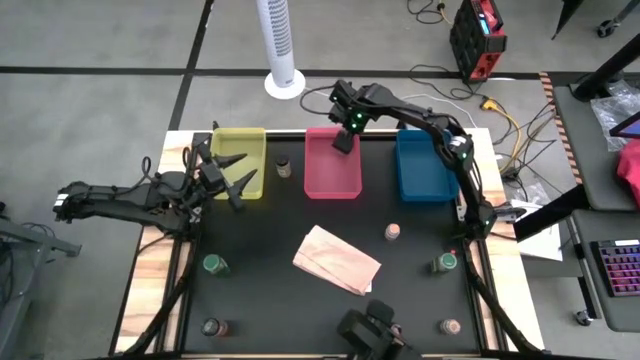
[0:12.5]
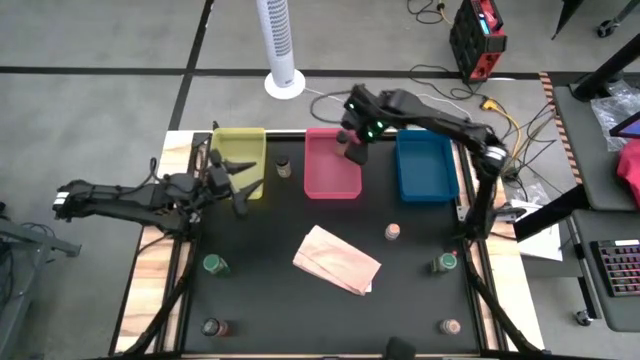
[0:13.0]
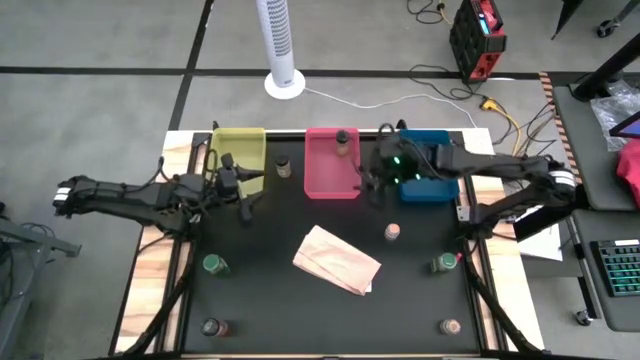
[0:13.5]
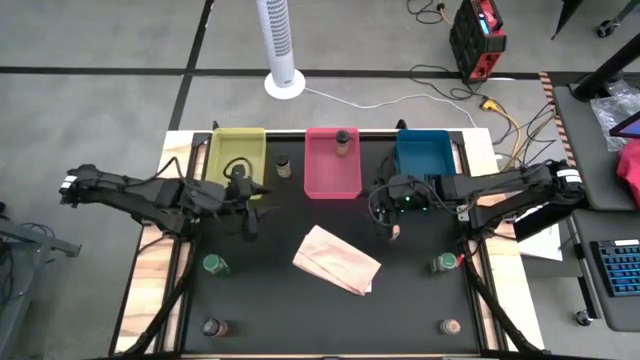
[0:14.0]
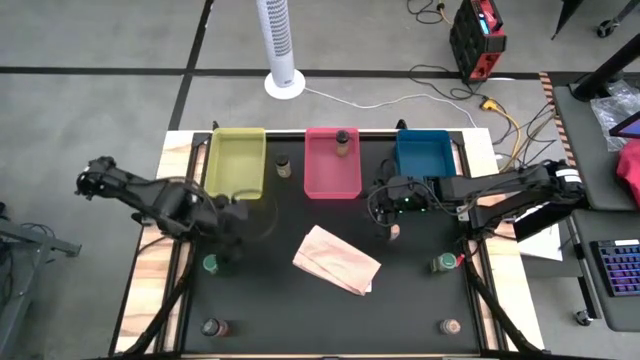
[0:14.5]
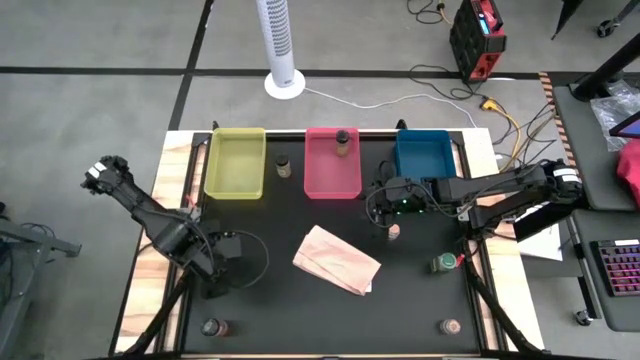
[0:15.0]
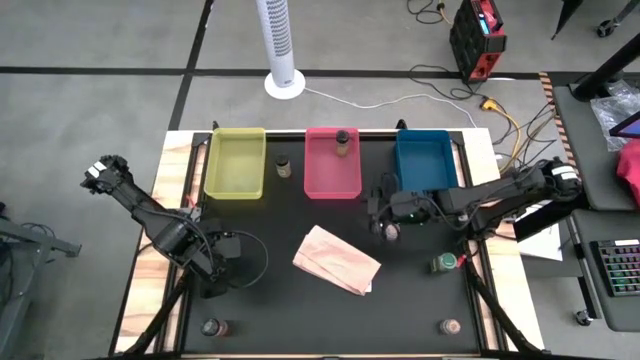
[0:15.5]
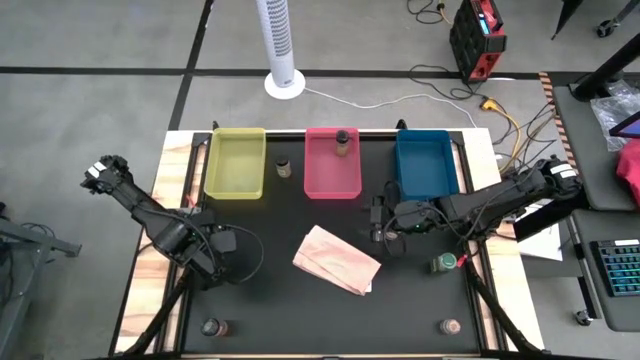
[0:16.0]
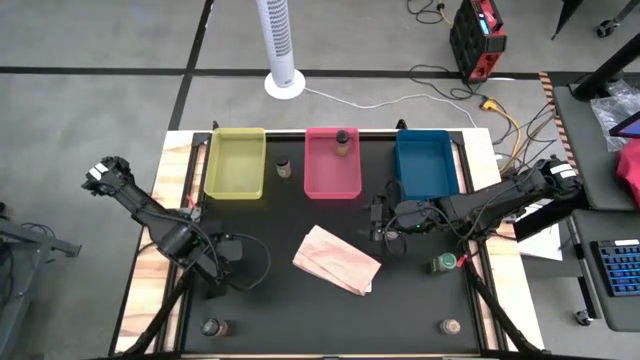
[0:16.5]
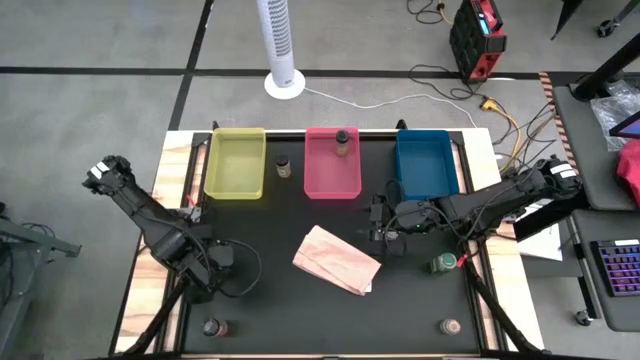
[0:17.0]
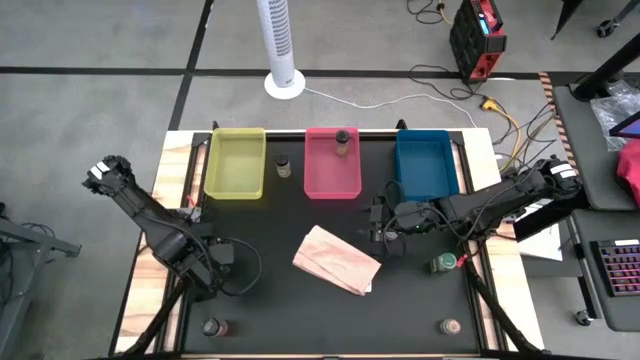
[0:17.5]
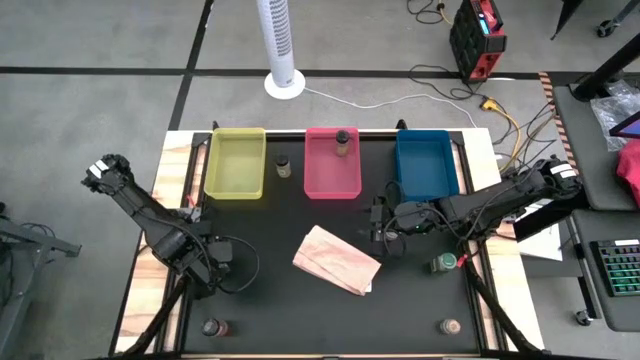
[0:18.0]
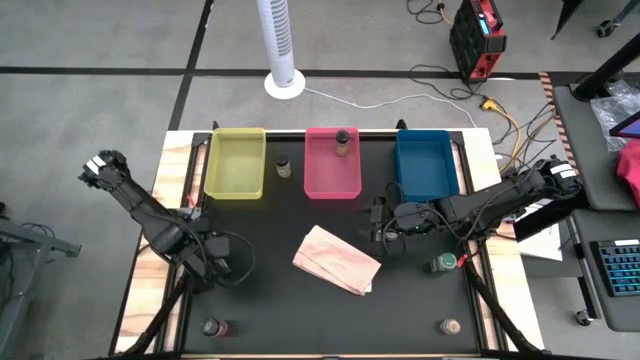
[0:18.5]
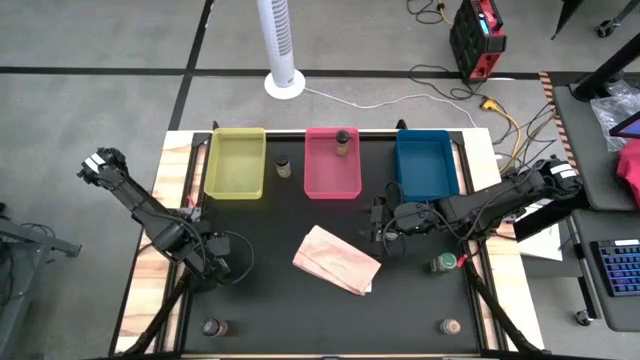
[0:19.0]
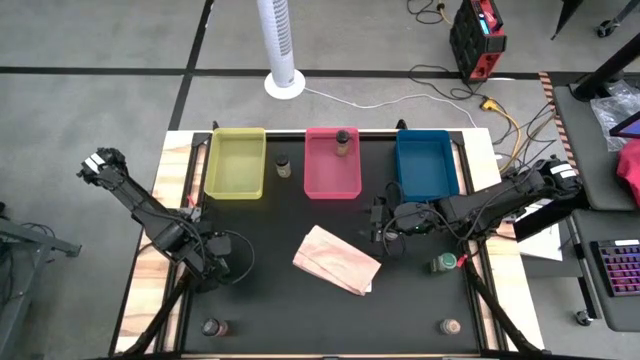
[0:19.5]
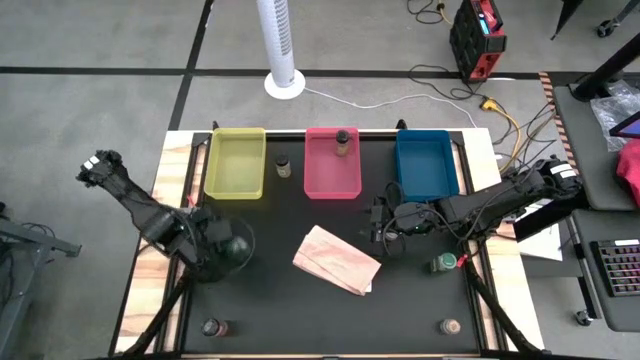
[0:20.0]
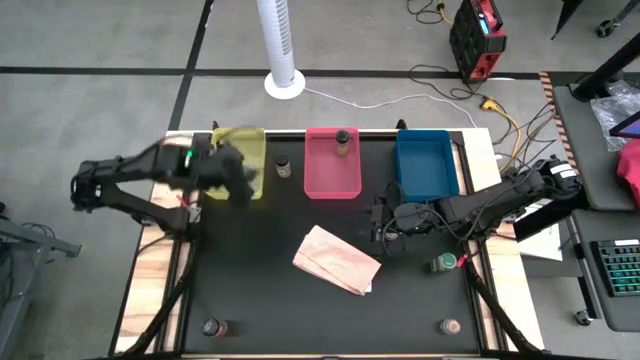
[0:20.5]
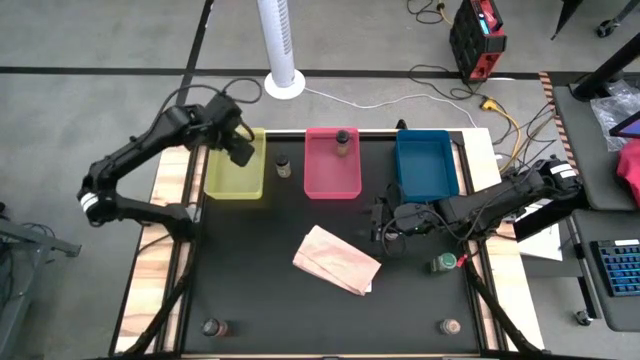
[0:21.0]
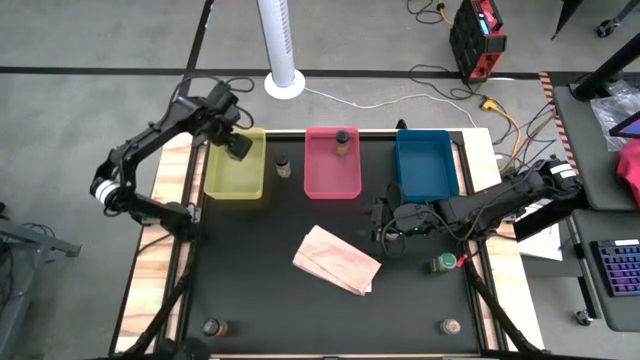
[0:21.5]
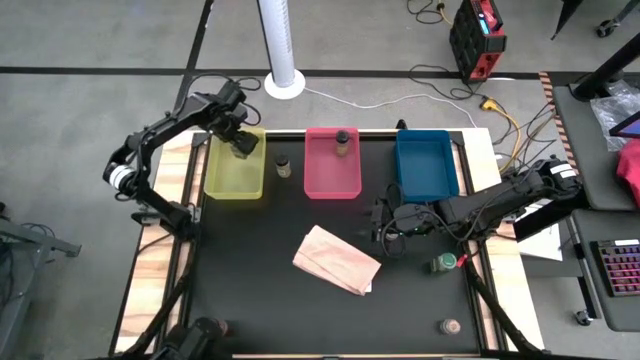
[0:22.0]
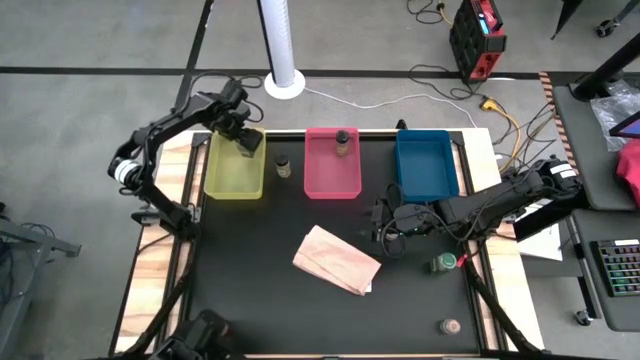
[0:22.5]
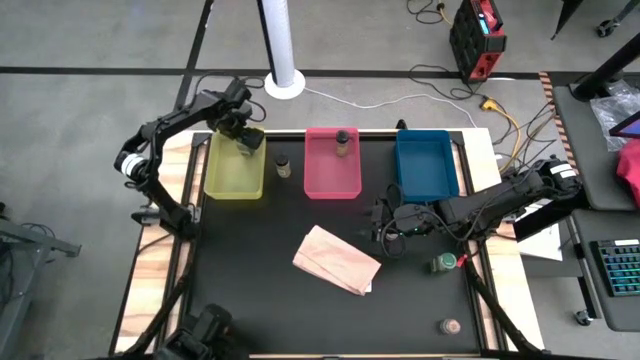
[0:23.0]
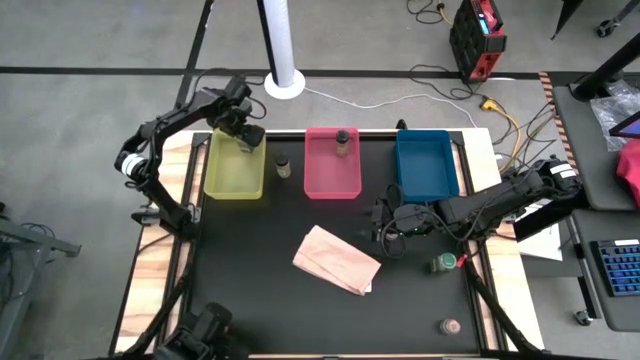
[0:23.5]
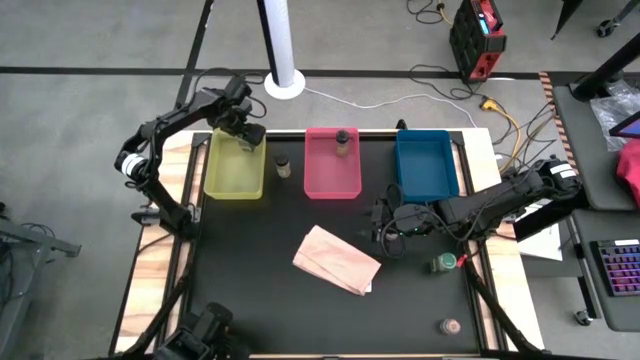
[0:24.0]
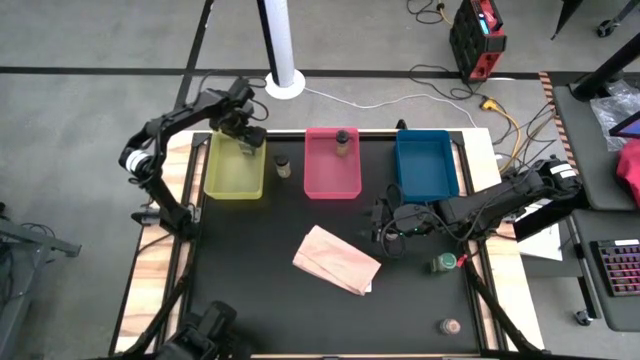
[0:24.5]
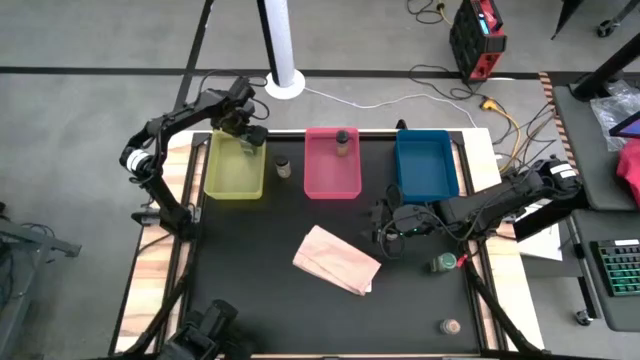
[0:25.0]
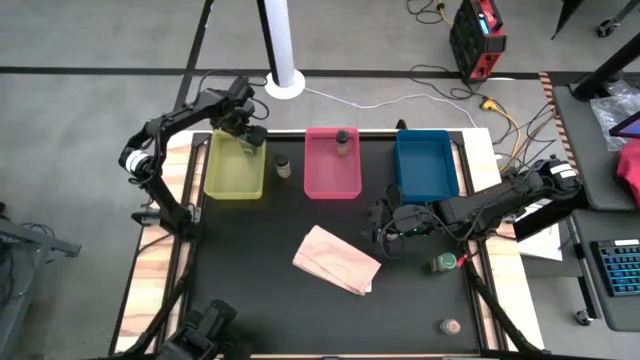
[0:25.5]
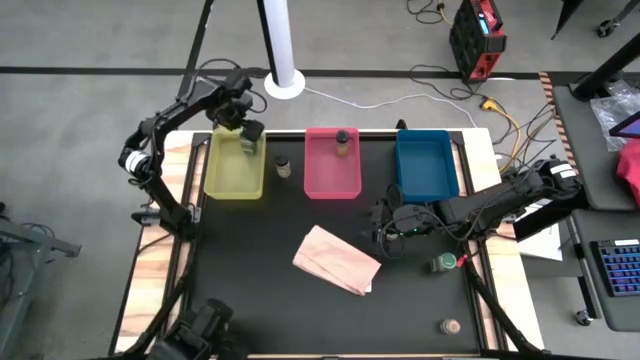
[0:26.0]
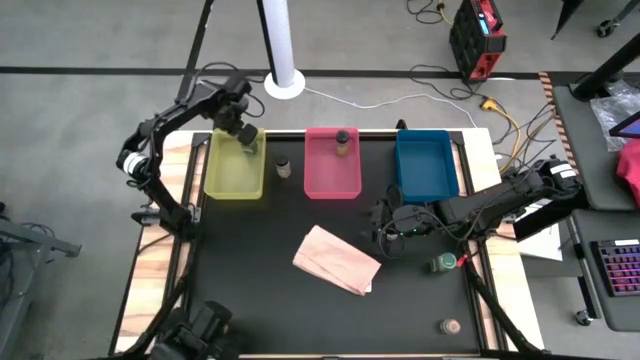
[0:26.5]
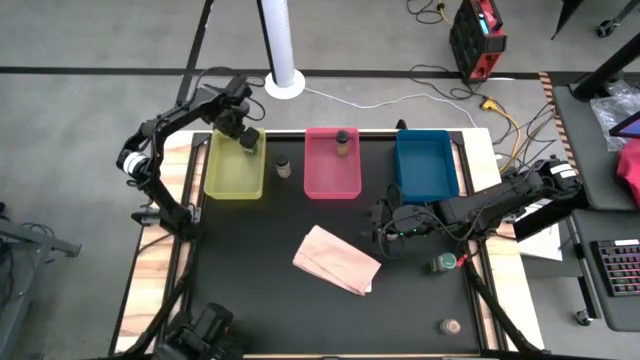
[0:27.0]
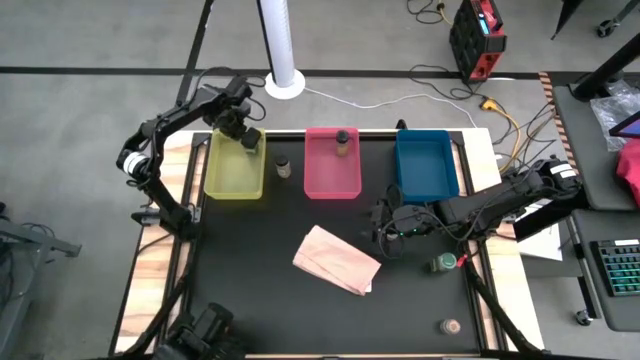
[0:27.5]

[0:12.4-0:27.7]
Task: Sort spices by type
Put the left green seasoning bottle into the yellow bin

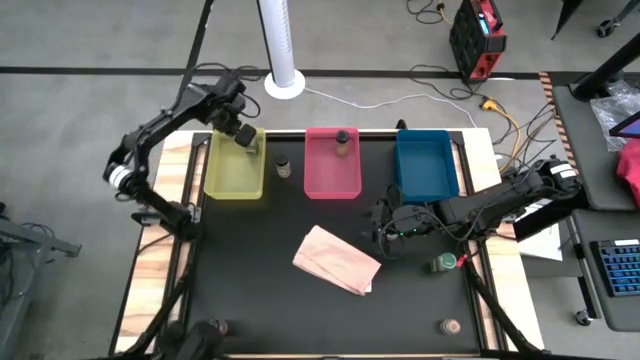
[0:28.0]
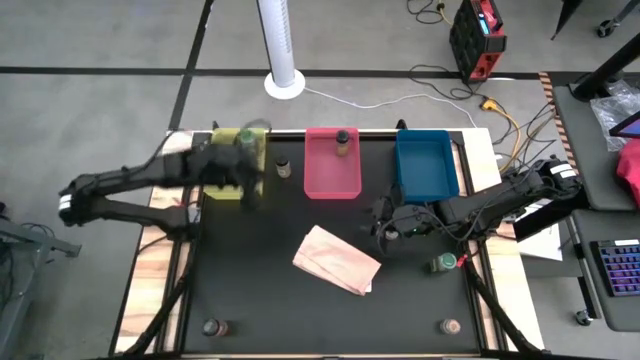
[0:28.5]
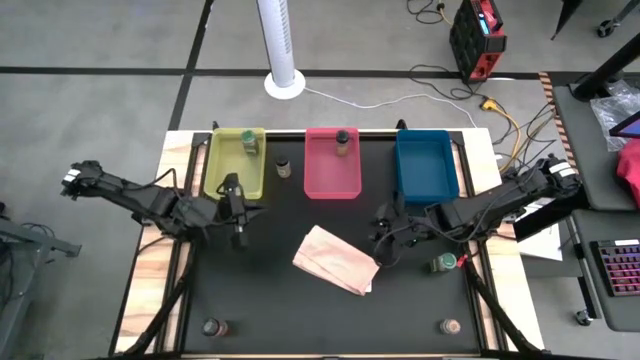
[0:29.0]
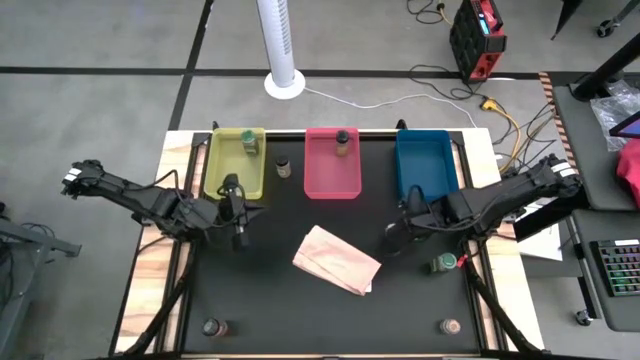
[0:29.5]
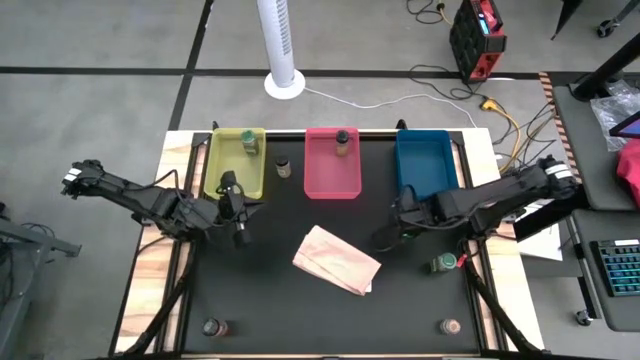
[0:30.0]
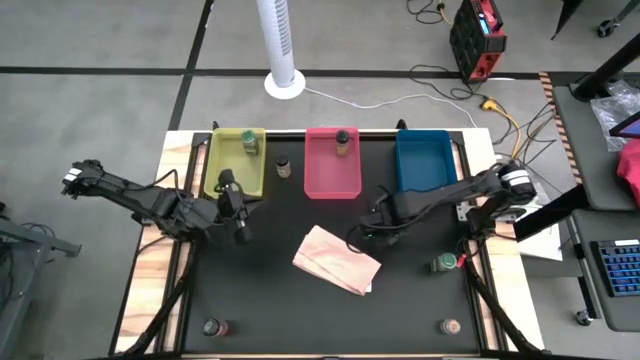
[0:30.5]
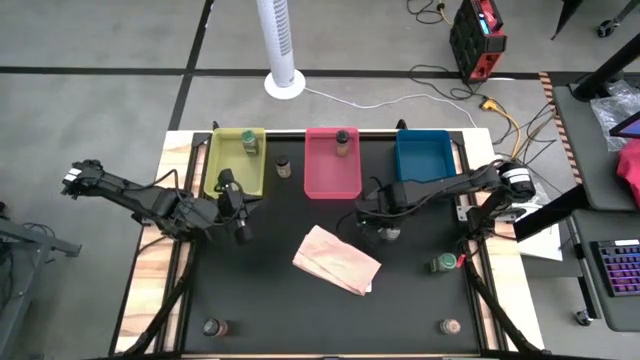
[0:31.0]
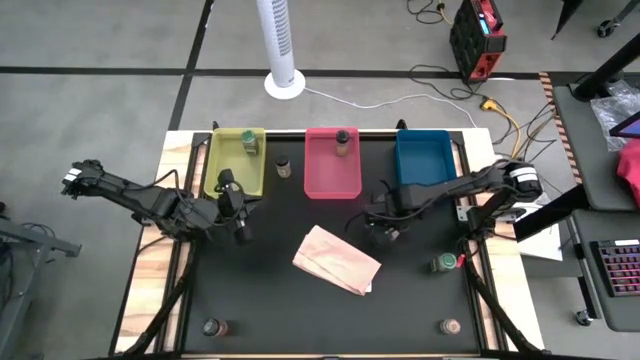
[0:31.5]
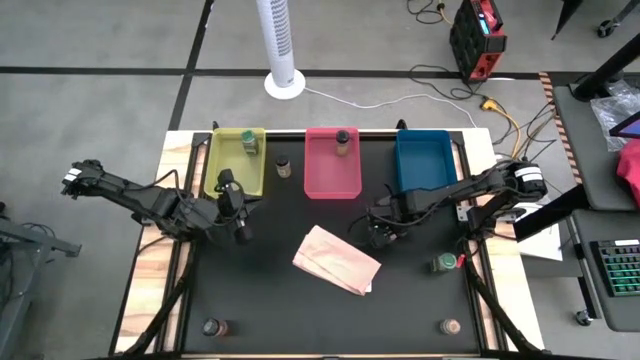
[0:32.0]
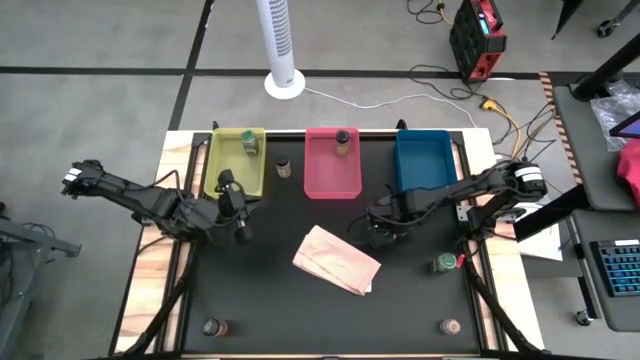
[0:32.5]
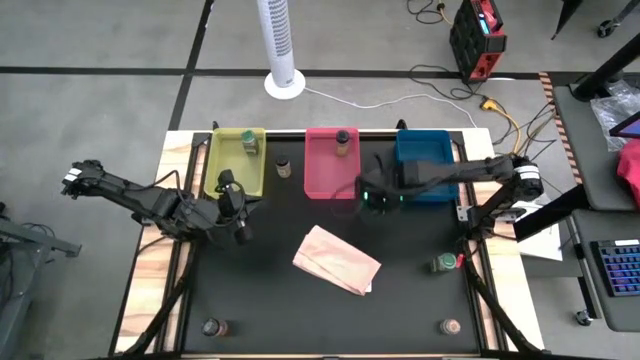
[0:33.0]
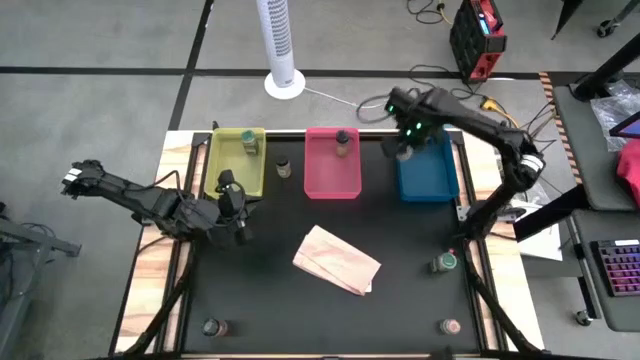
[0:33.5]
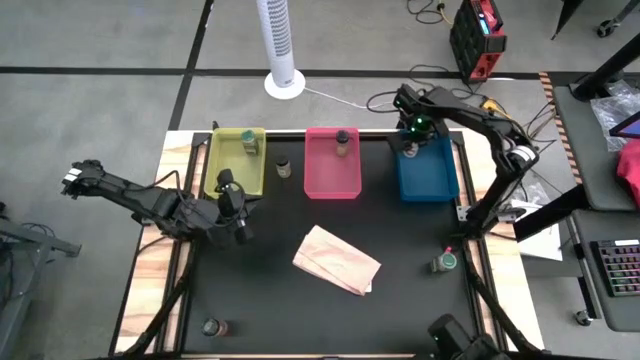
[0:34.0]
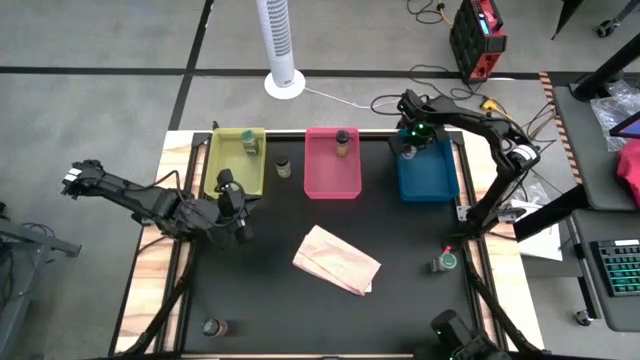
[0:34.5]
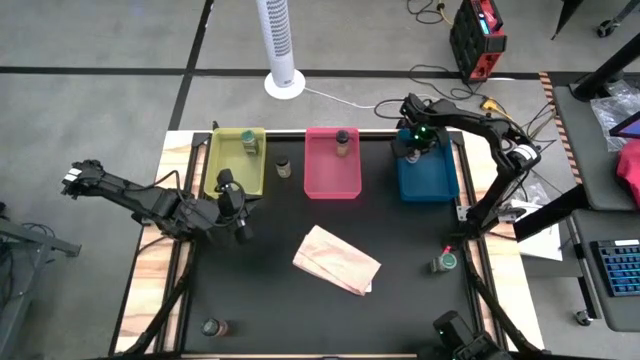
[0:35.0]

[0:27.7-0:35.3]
Put the top brown seasoning bottle into the blue bin
